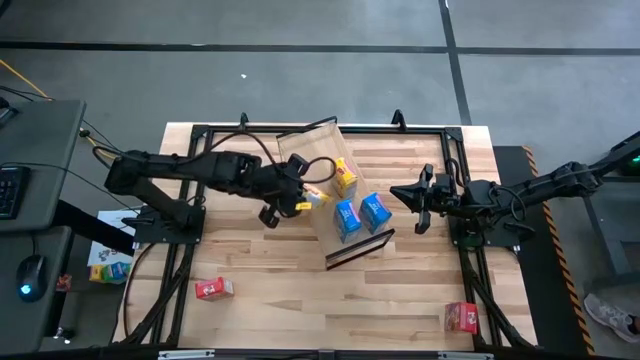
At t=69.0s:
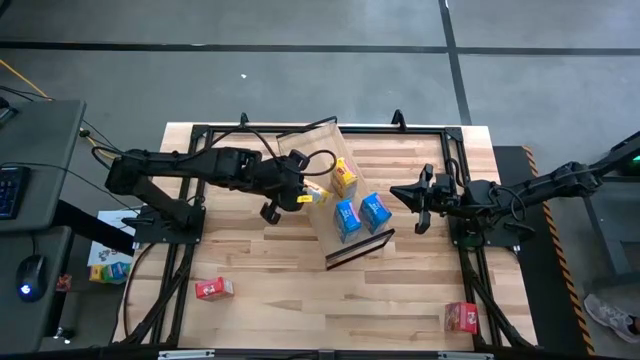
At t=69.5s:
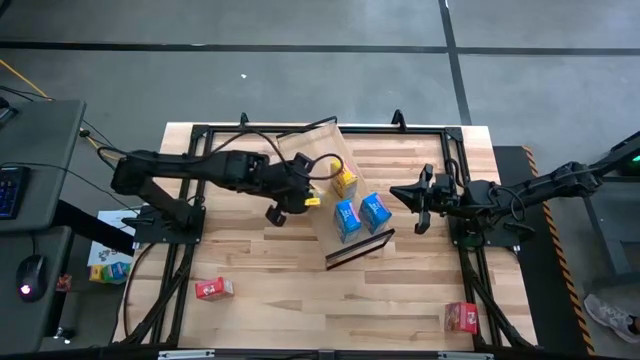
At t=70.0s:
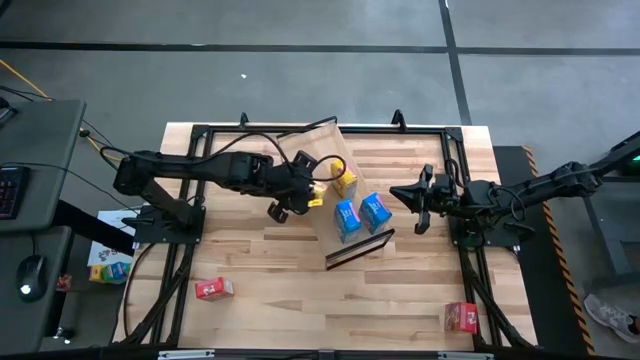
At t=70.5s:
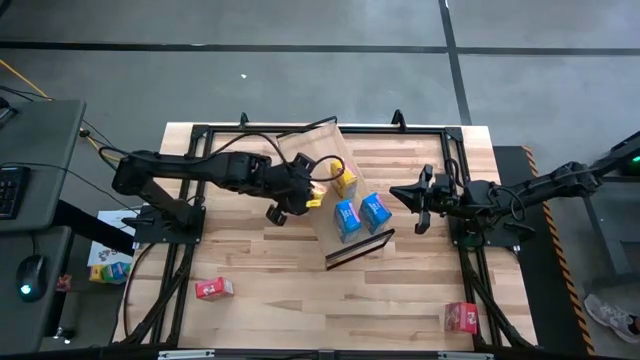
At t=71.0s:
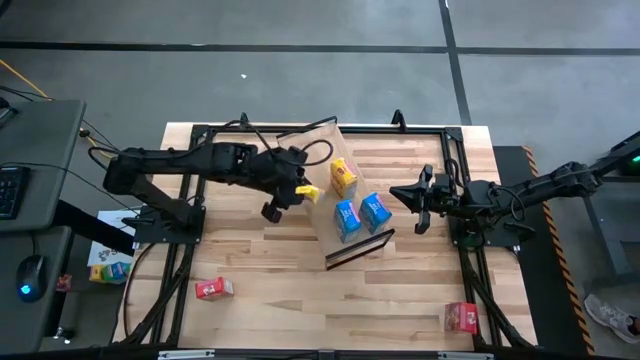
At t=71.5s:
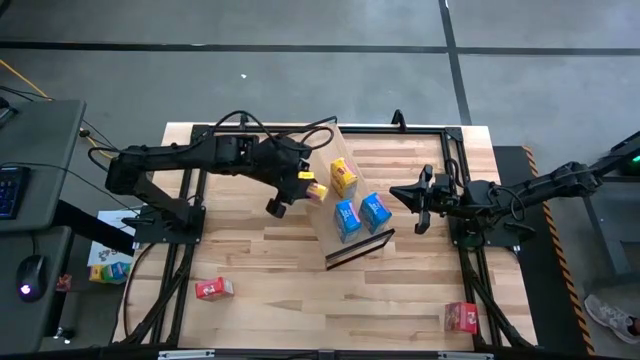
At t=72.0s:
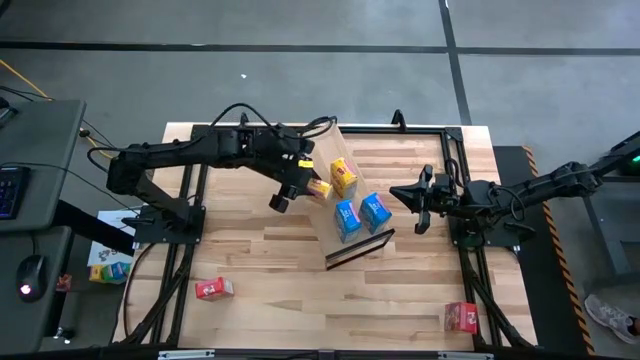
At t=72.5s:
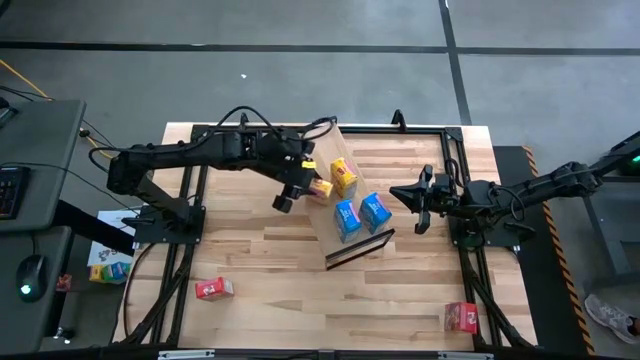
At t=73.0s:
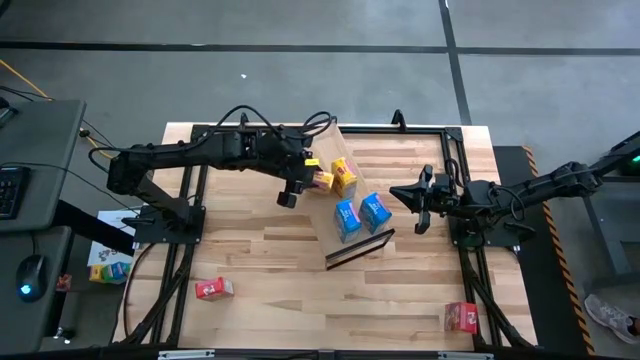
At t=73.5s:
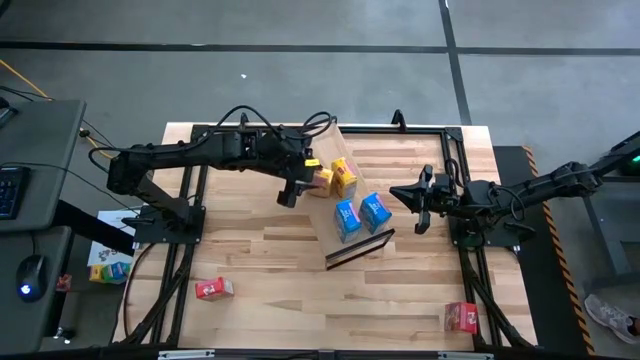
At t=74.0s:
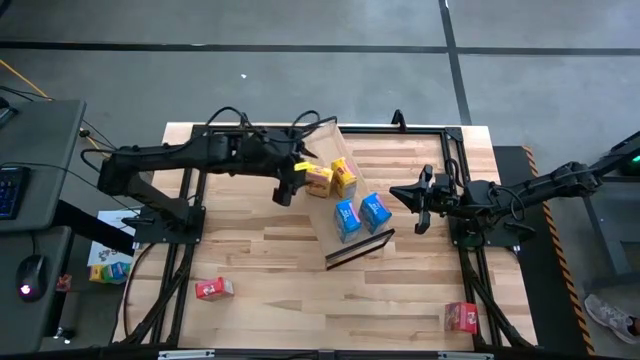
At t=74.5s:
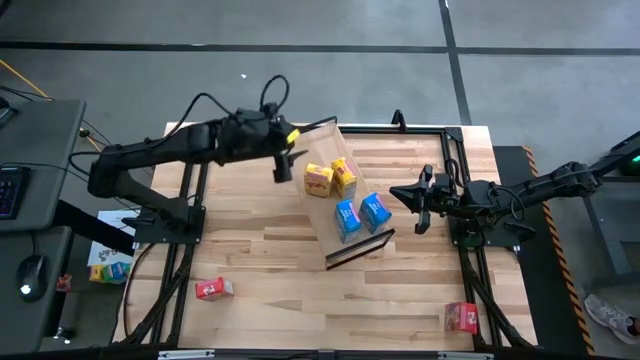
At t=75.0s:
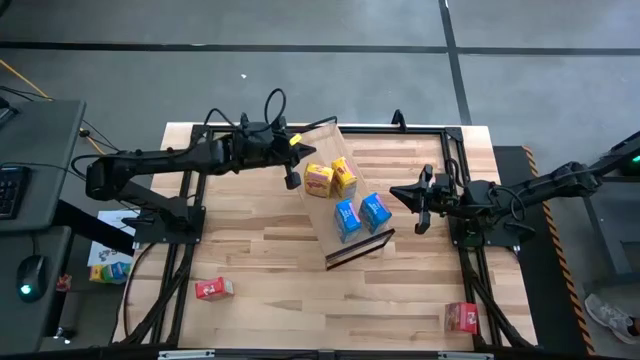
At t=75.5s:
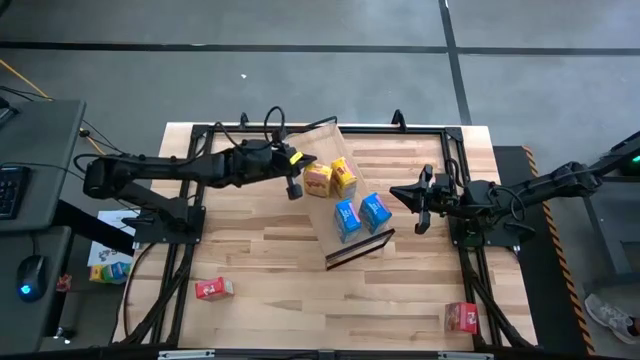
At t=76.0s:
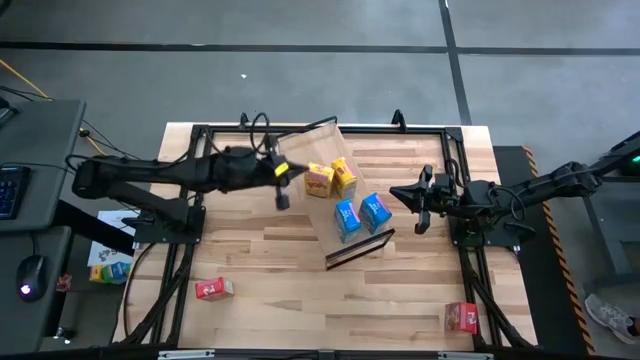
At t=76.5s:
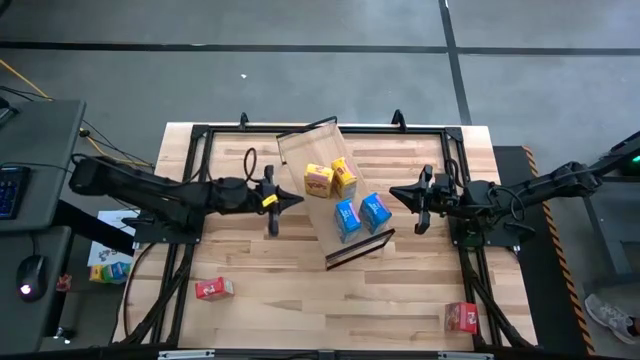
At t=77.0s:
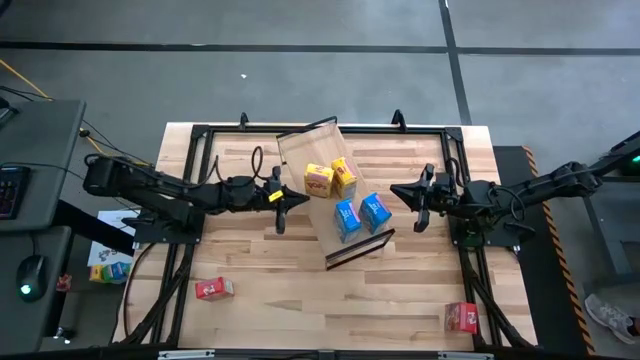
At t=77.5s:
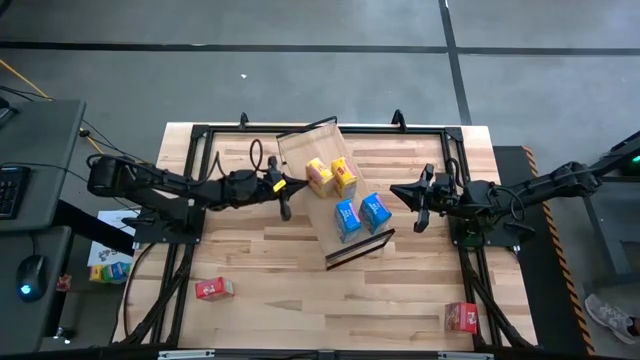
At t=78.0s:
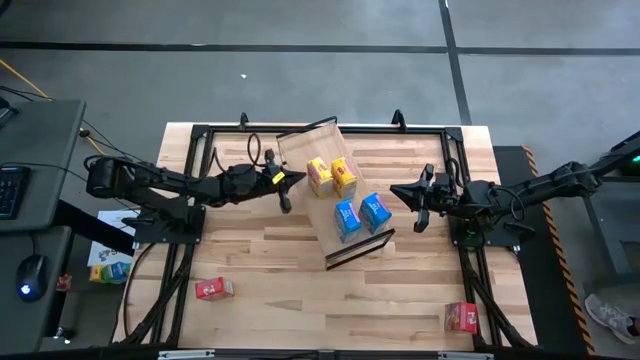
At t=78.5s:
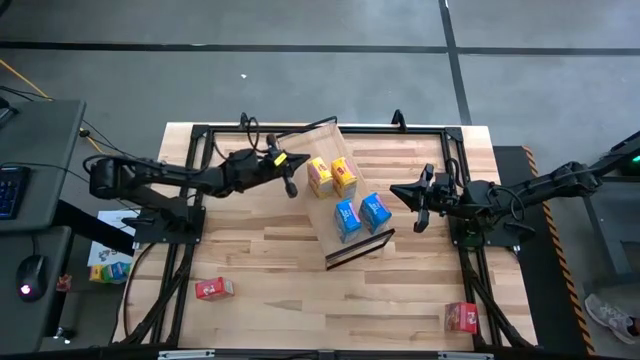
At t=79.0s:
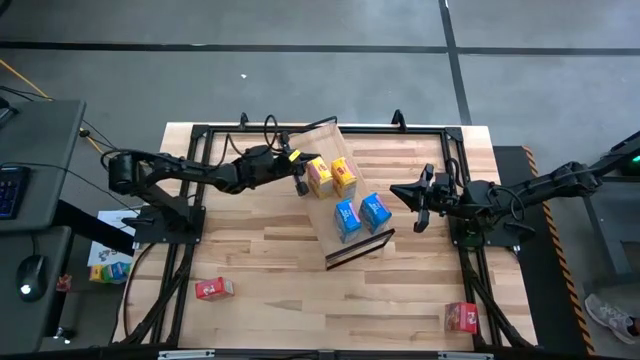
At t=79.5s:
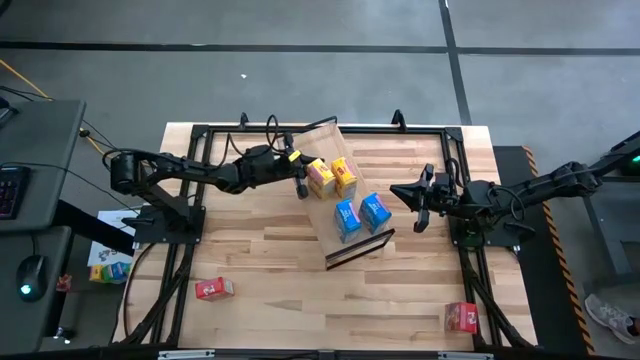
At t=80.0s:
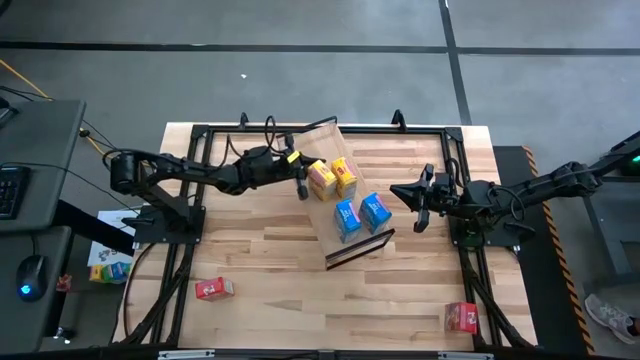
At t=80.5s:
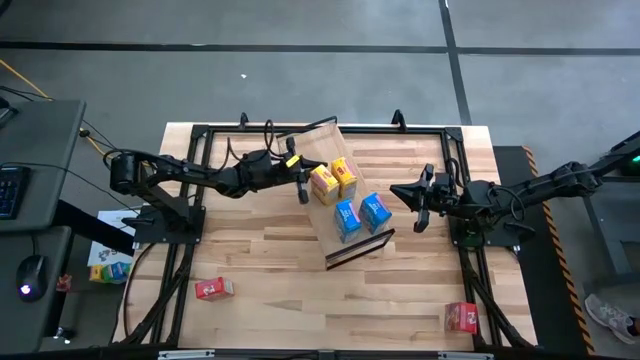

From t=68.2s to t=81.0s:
Task: Stack cereal on shelf
Put the yellow cereal box on the shelf aligned with the other yellow cereal box

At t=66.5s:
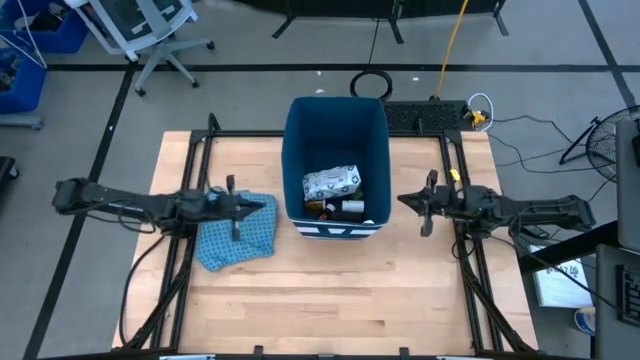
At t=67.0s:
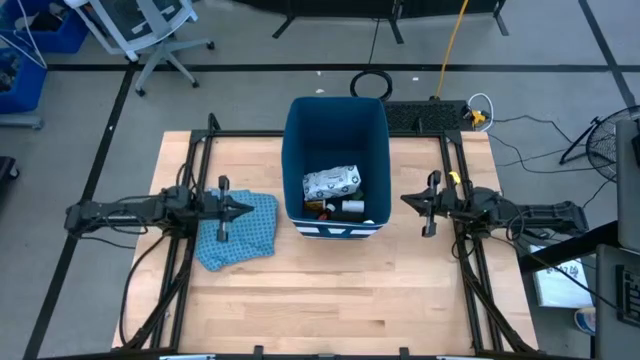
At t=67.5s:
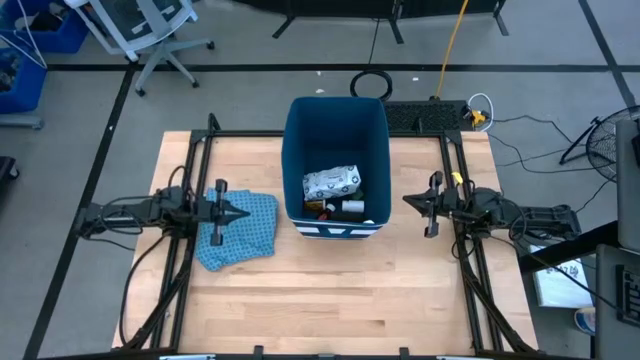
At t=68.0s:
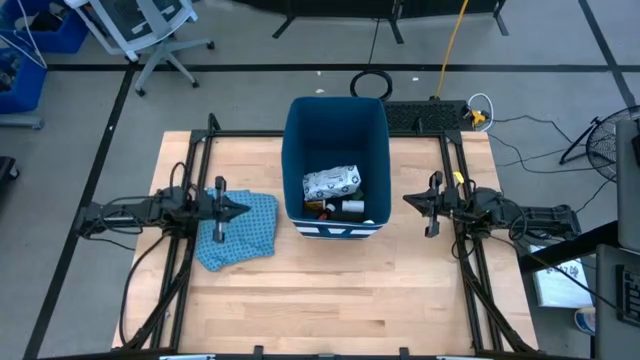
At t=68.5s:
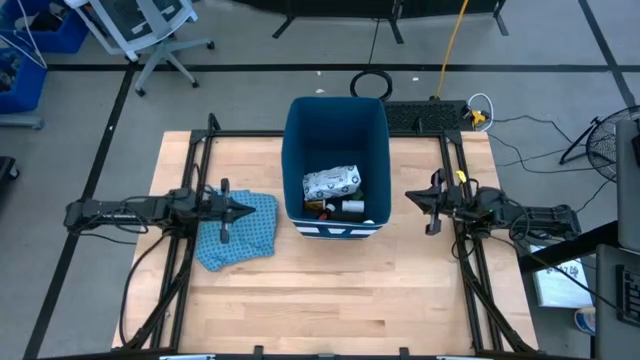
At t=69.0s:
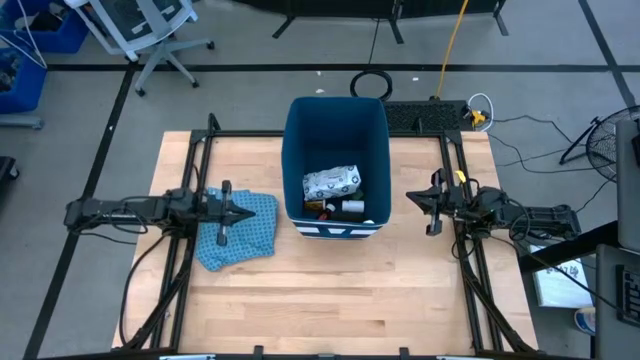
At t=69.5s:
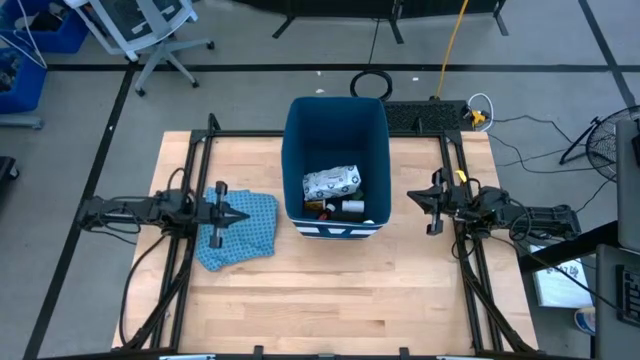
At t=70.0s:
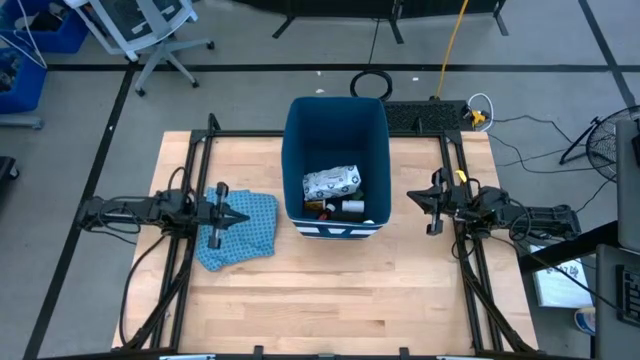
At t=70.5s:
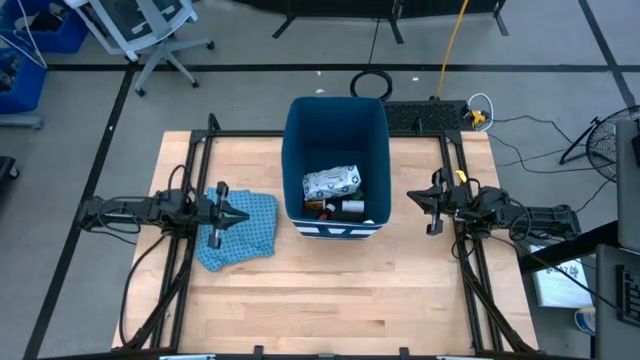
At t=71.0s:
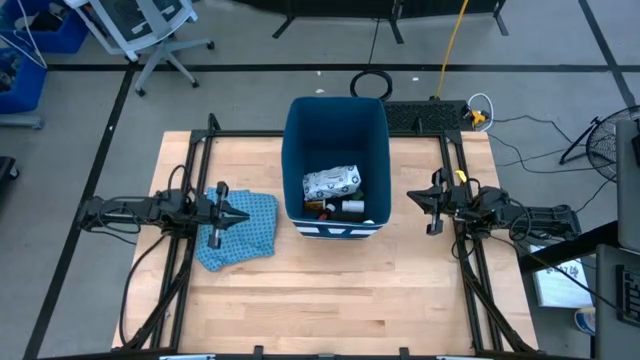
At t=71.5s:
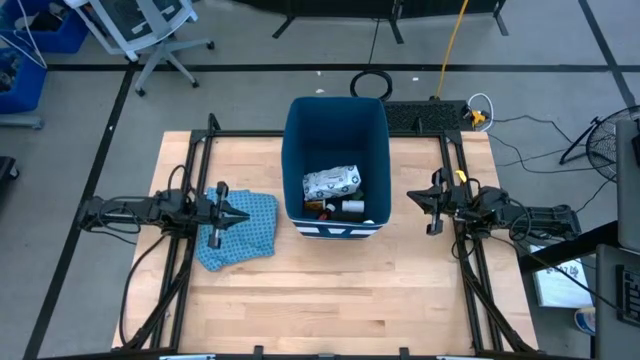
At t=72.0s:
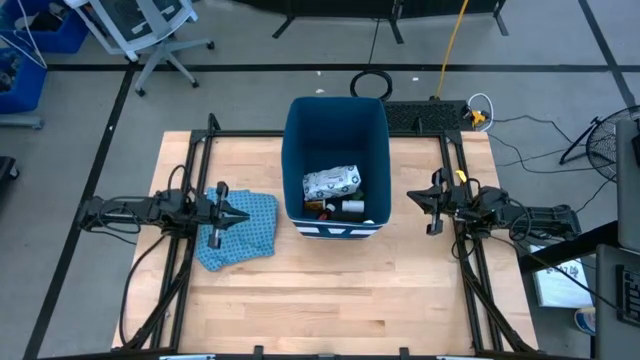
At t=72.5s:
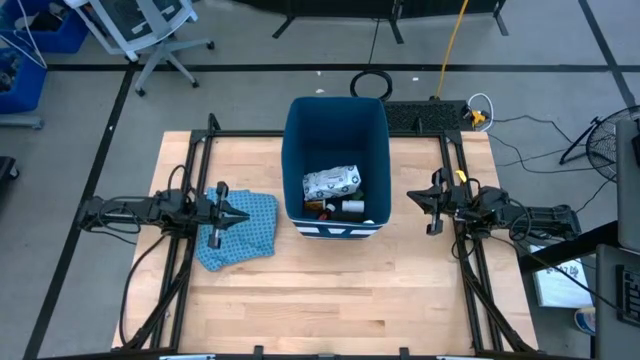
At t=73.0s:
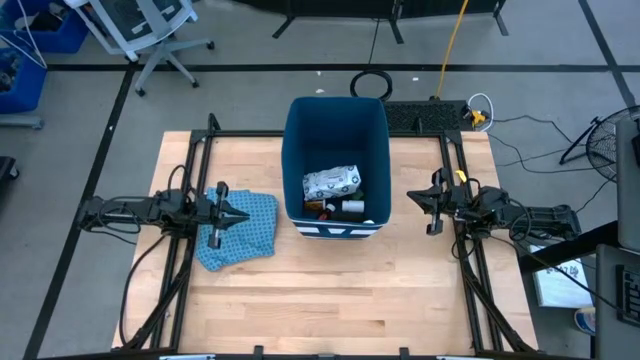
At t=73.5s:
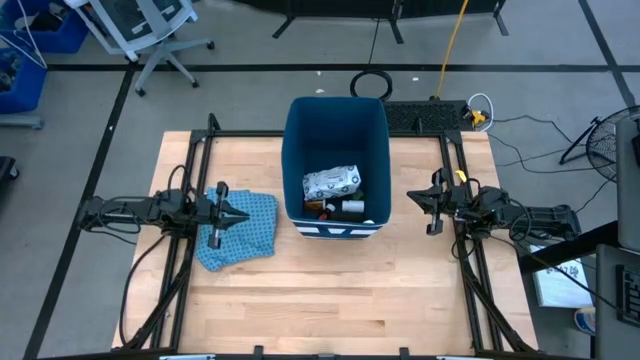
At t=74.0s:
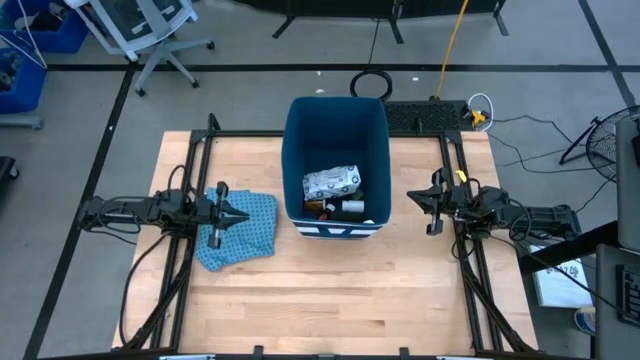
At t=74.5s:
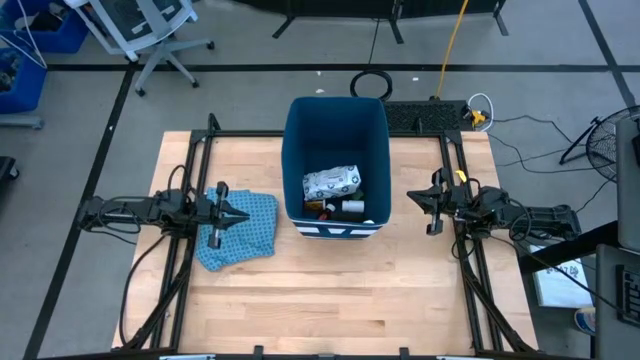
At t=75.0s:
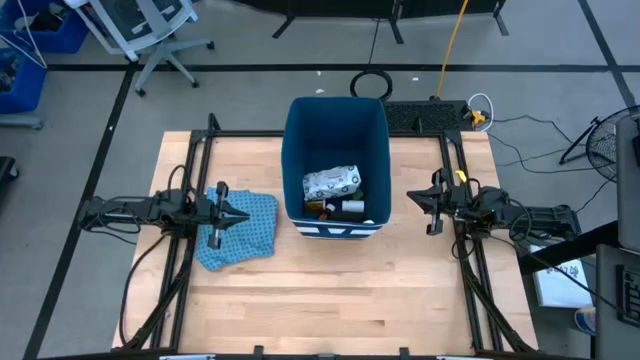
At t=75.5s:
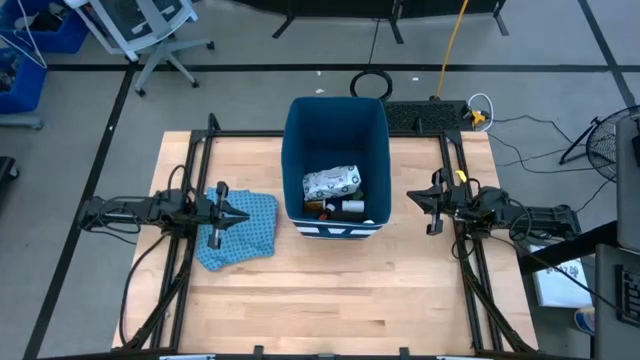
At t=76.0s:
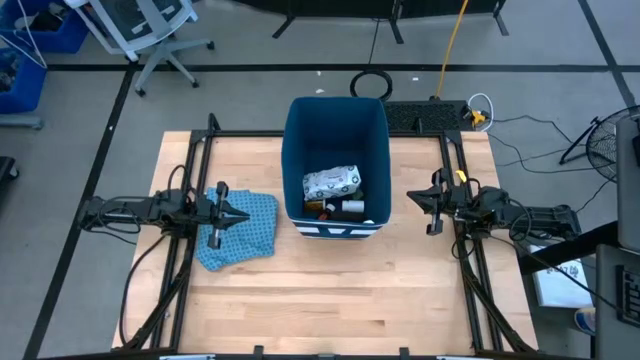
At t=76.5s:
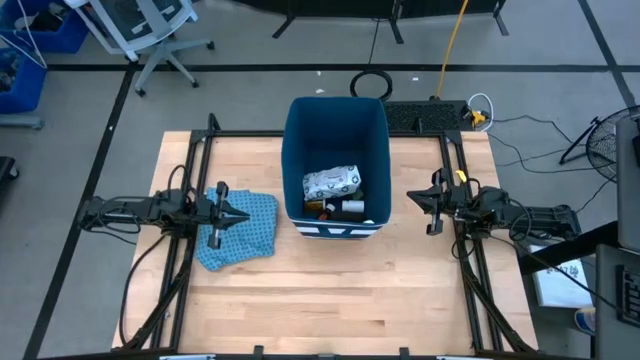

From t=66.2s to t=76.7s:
Task: Pick & place medical supplies in basket/bin
Return to Home Position
